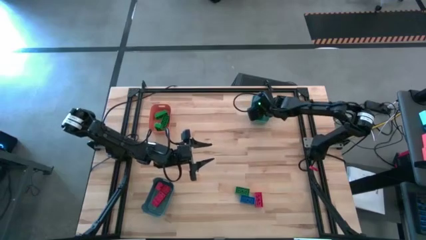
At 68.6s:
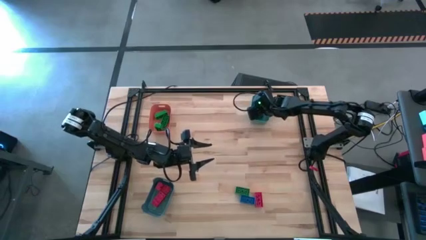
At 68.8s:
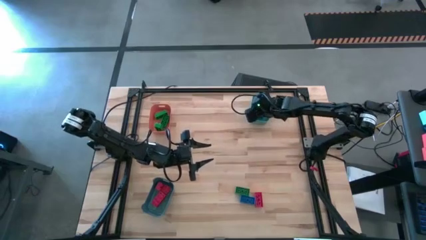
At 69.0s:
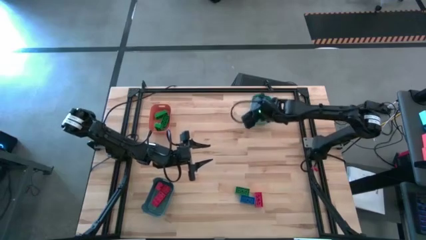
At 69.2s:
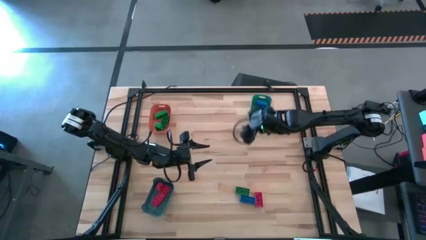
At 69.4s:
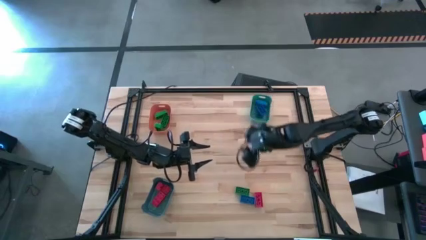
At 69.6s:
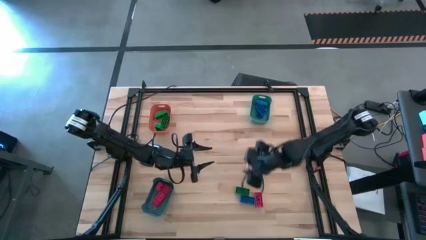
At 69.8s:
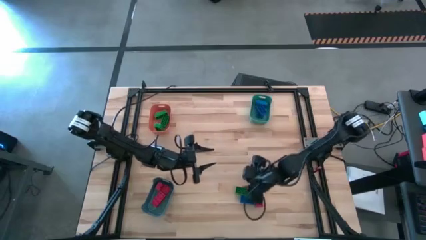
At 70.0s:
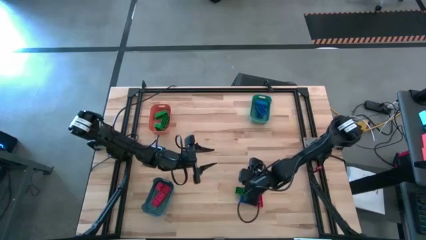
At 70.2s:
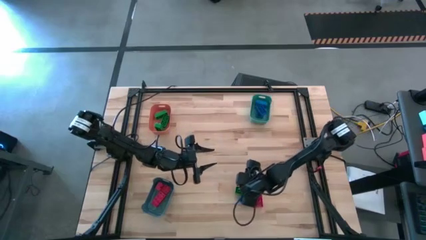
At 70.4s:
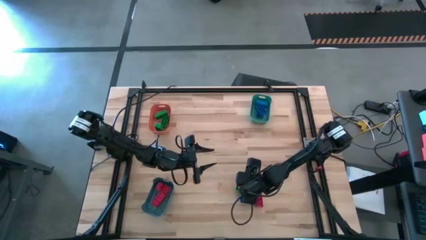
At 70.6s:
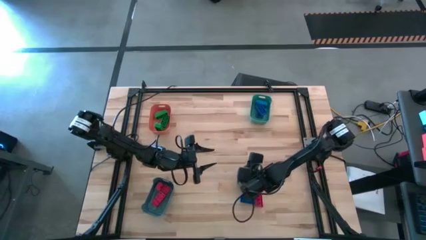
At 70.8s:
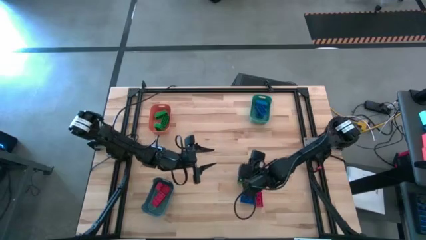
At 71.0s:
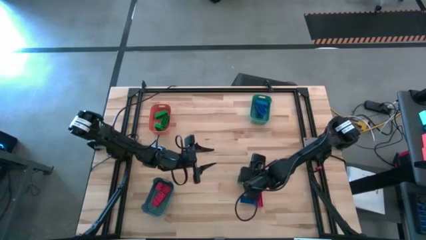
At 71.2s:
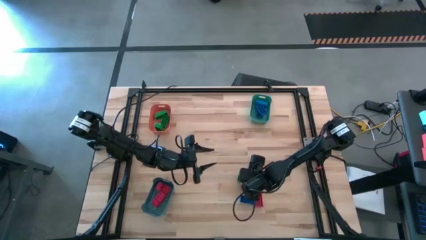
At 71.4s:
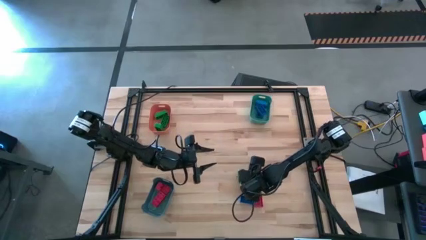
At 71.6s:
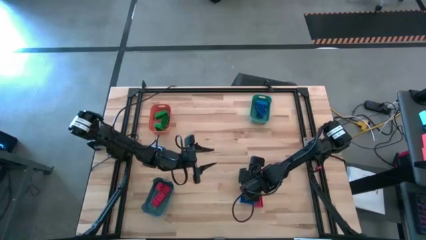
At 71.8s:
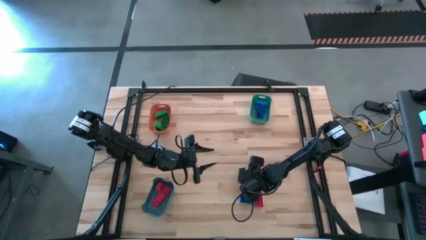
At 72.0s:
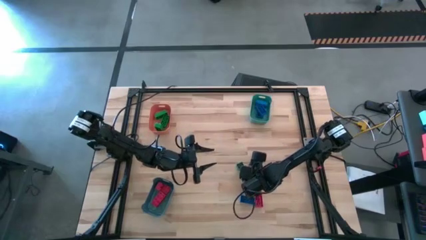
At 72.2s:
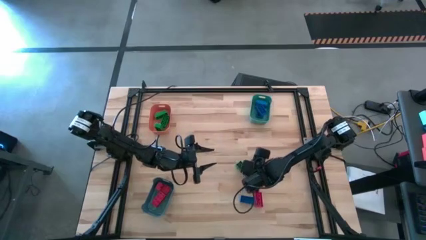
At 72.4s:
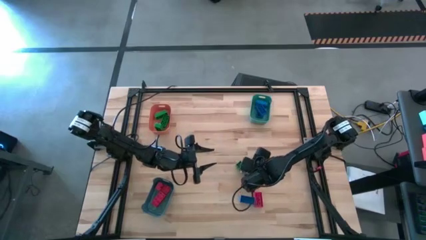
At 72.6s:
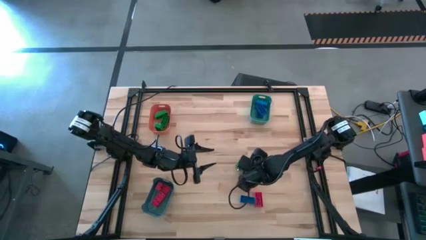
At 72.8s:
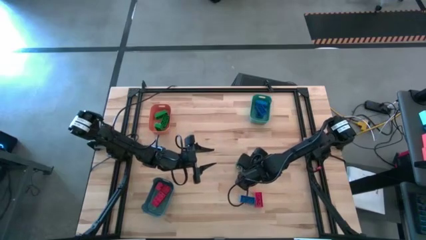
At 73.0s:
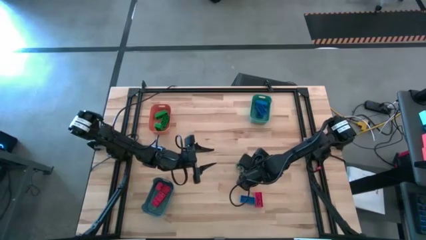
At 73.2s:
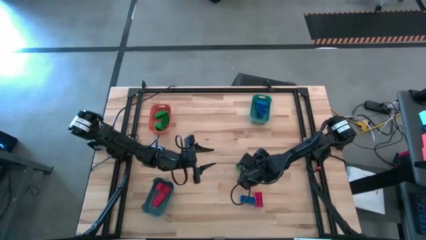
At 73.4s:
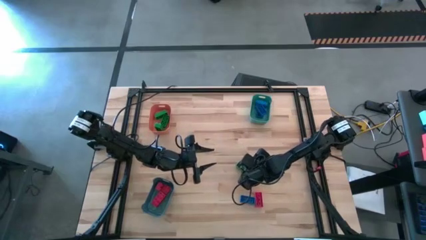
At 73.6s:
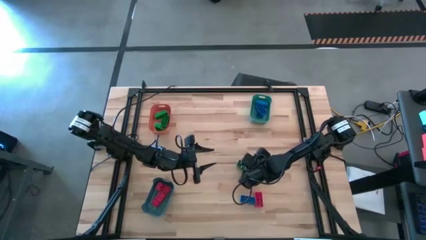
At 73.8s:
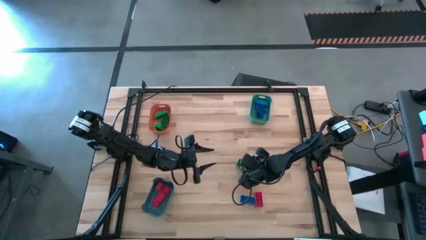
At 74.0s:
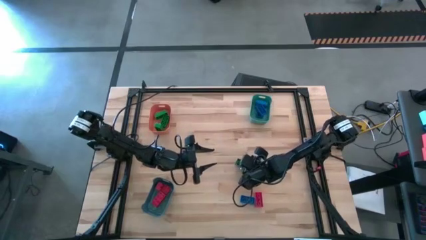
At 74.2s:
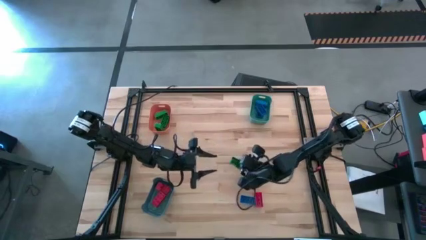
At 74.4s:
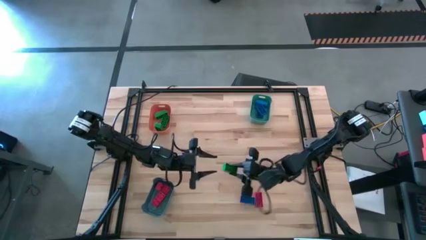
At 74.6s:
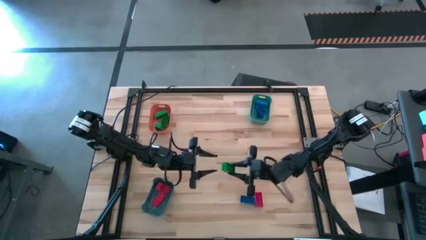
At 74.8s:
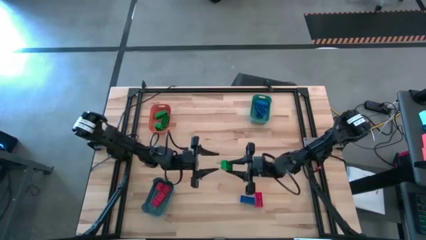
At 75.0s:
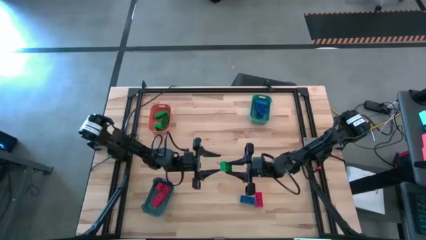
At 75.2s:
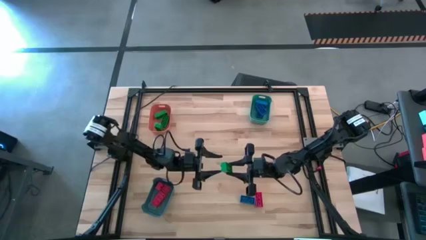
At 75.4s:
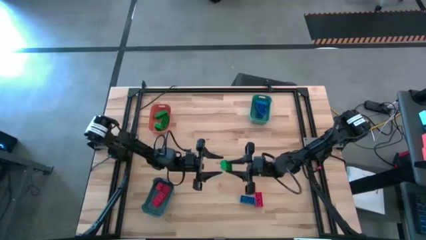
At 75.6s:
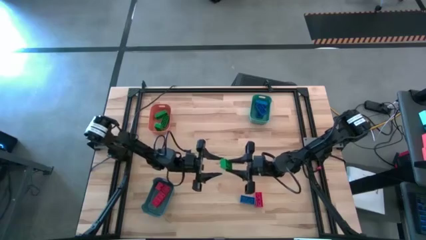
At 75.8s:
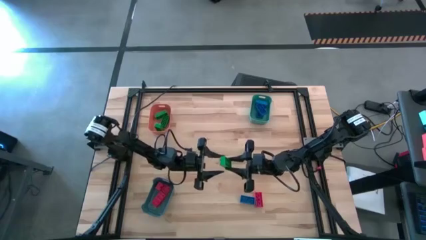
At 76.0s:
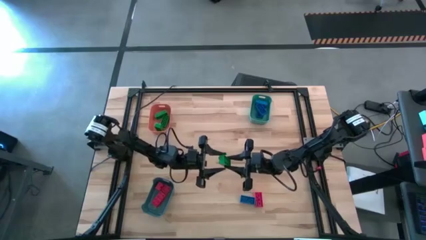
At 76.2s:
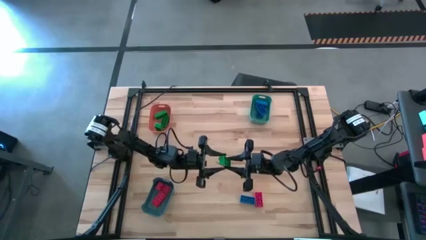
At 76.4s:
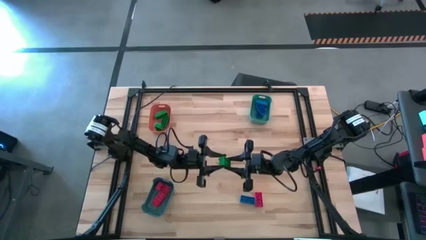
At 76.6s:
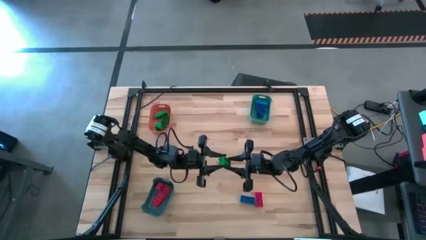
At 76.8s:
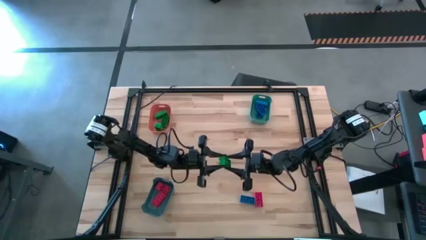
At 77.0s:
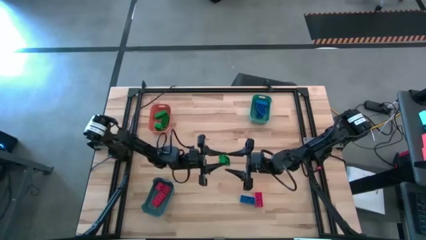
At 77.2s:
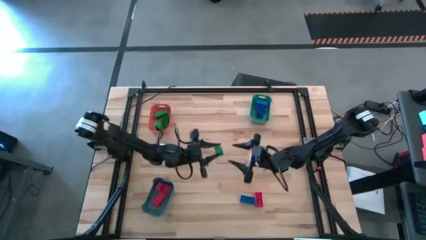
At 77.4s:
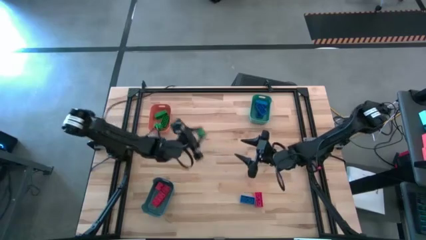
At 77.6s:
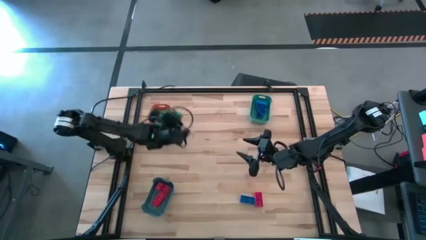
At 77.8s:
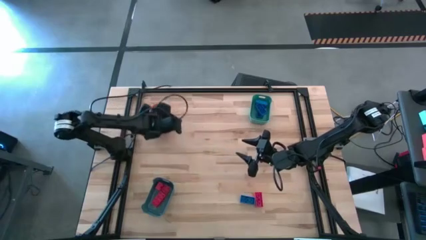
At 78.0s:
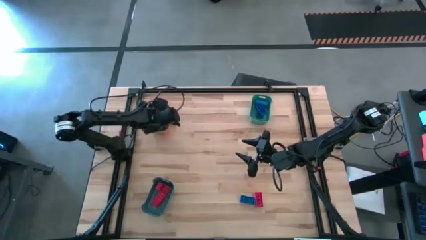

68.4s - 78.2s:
Task: Sort & place blocks by color
Put the green game piece into the orange bin

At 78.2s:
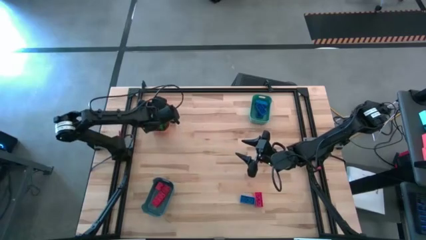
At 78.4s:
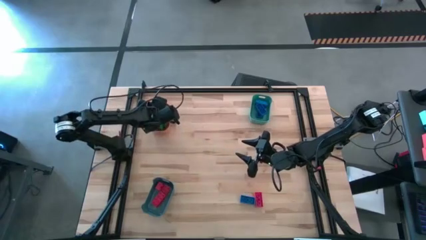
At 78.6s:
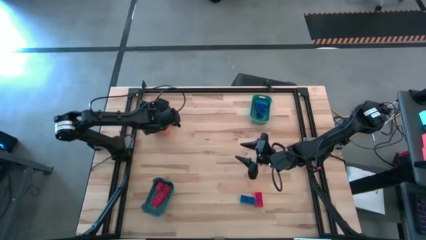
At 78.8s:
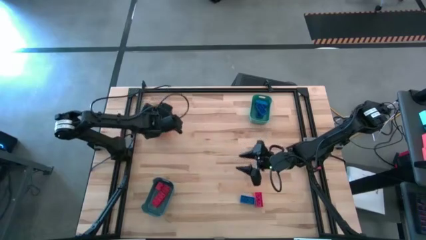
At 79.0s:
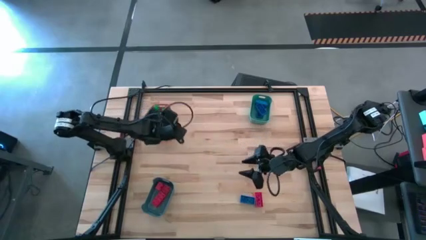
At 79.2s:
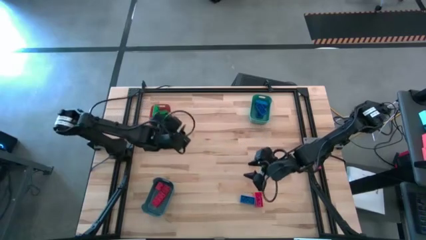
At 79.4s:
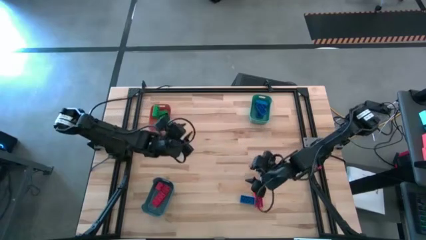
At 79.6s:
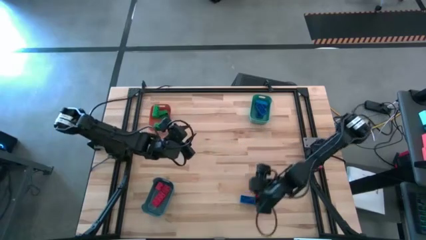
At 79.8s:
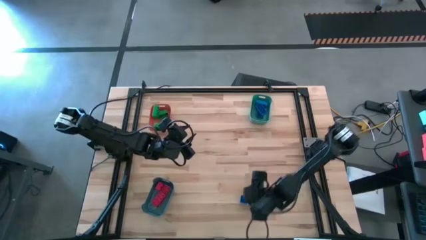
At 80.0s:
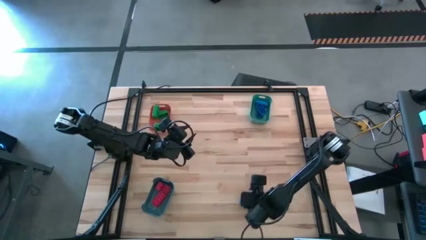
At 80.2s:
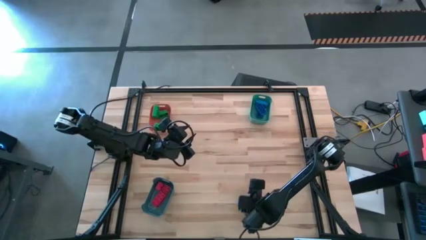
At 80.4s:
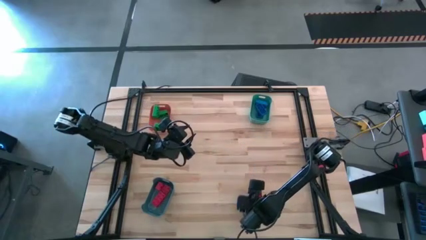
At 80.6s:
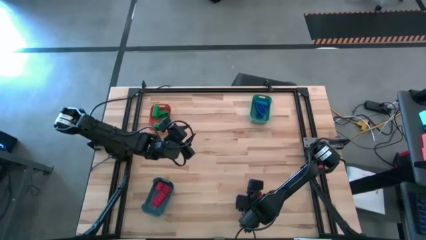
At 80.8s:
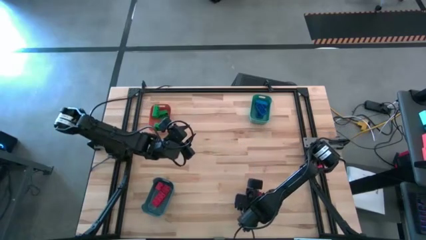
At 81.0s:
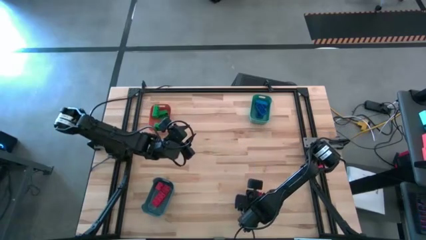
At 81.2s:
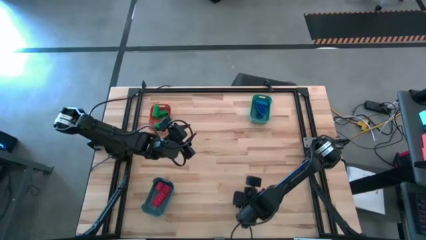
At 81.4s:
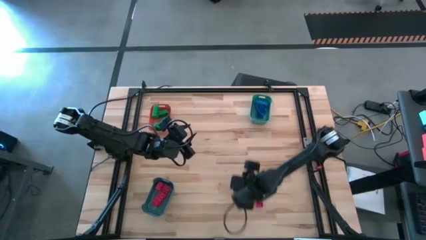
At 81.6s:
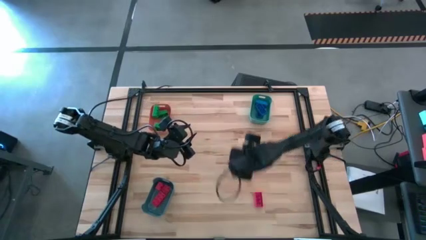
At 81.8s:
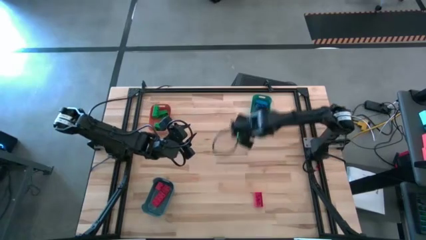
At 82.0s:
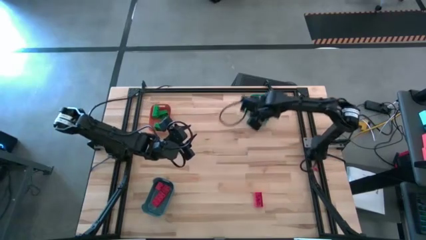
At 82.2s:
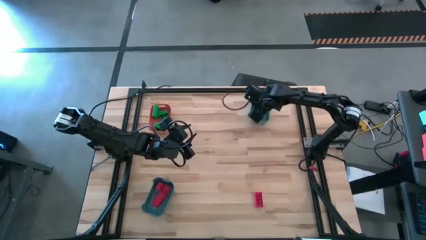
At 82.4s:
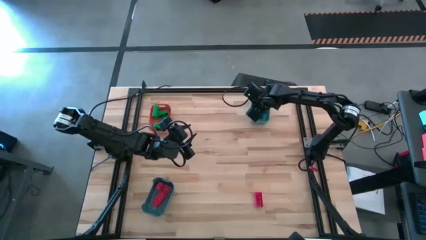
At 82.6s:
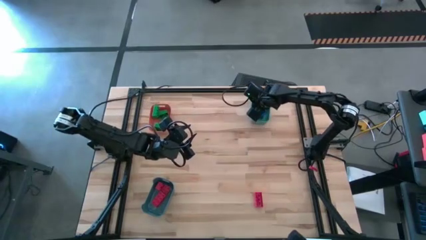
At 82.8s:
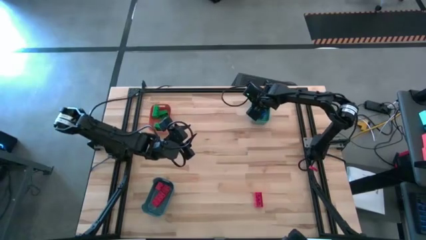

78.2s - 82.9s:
Put the blue game piece into the green bin
